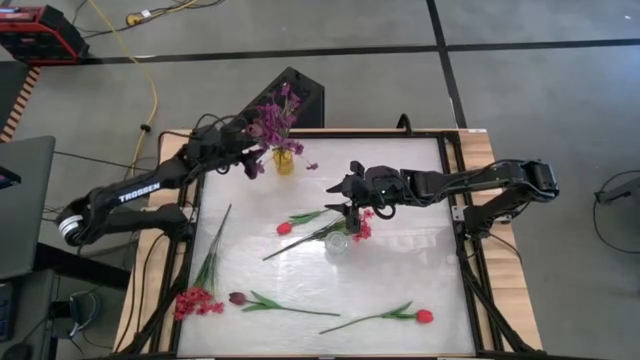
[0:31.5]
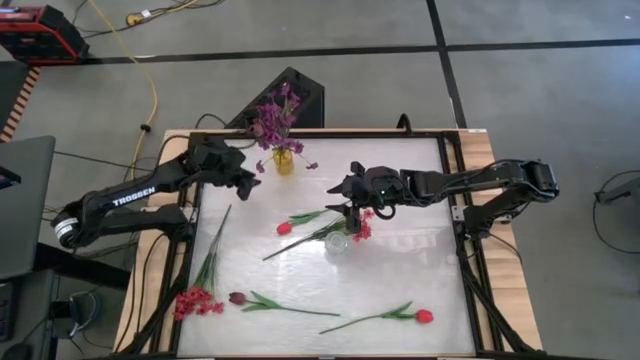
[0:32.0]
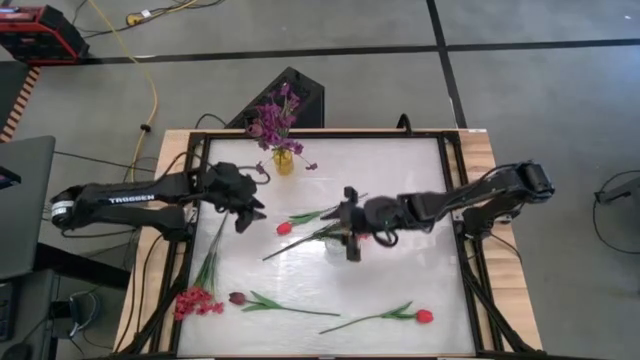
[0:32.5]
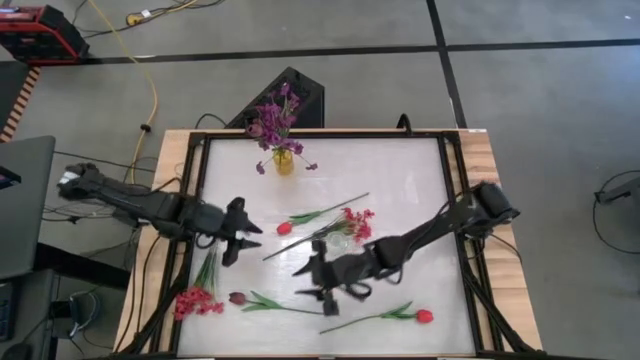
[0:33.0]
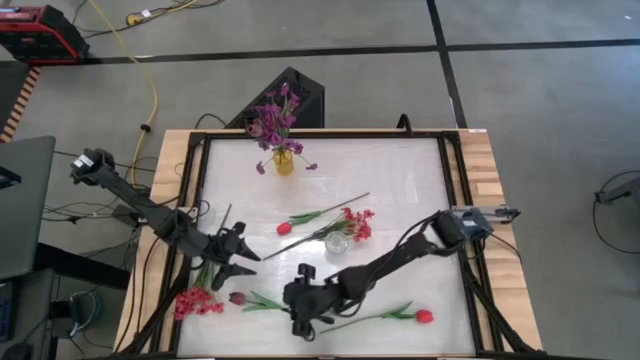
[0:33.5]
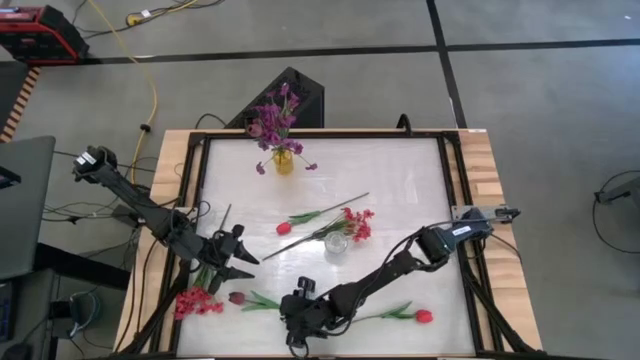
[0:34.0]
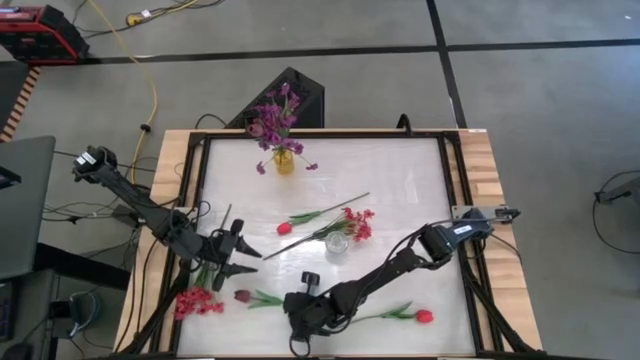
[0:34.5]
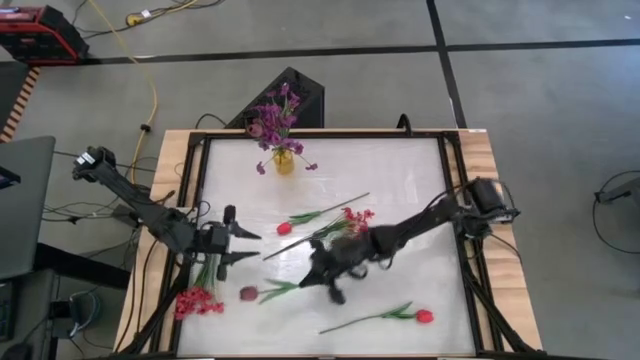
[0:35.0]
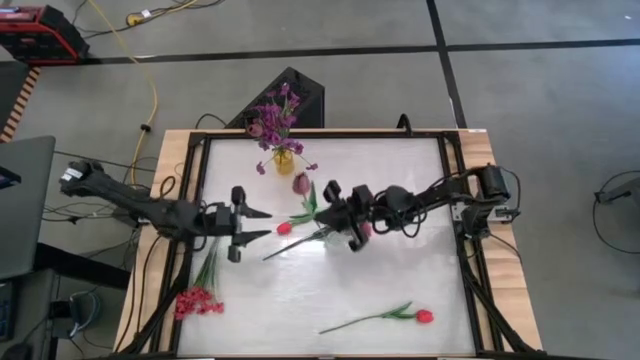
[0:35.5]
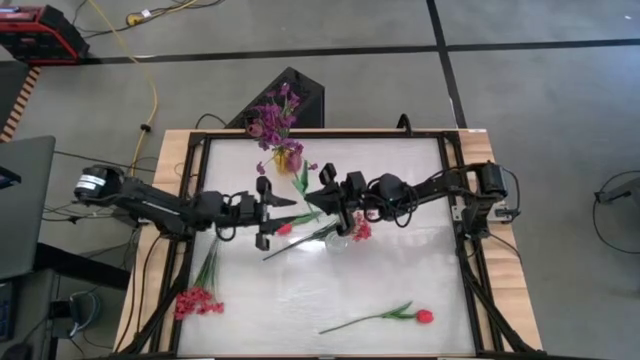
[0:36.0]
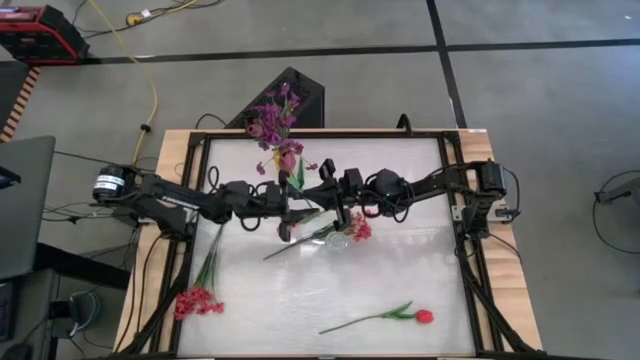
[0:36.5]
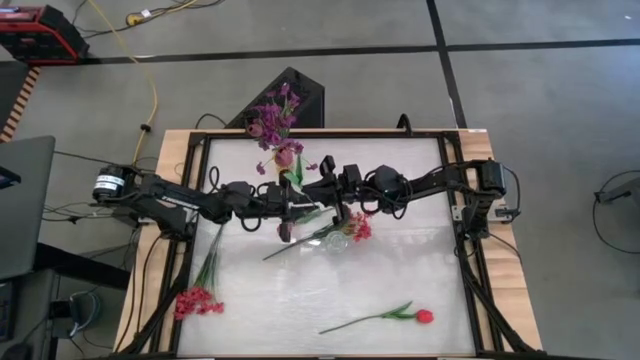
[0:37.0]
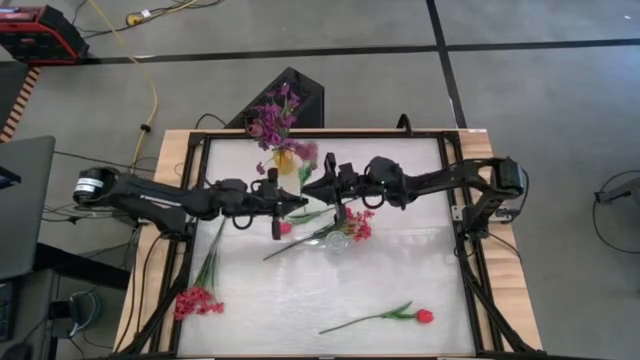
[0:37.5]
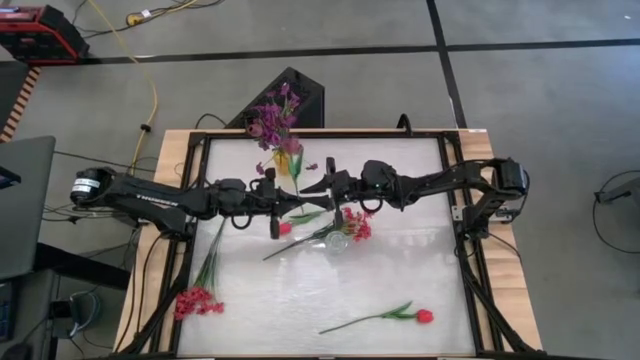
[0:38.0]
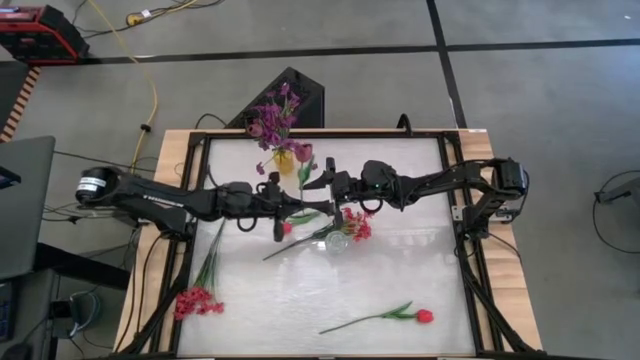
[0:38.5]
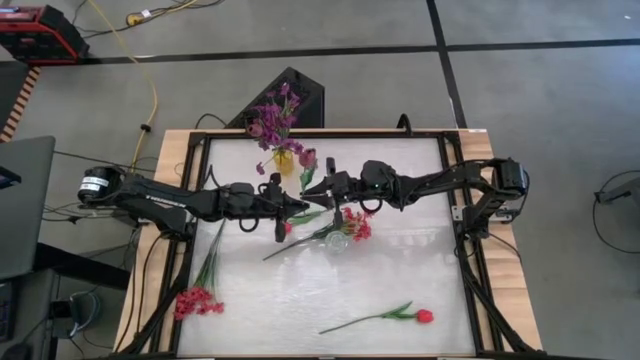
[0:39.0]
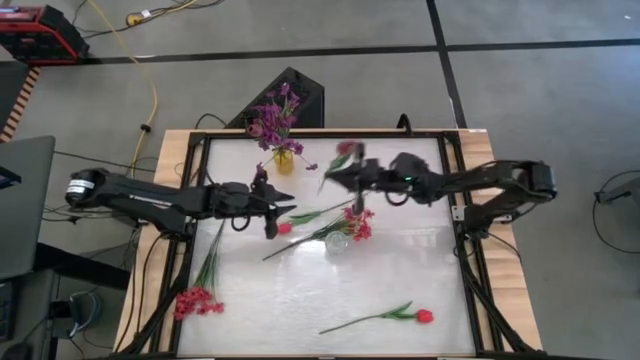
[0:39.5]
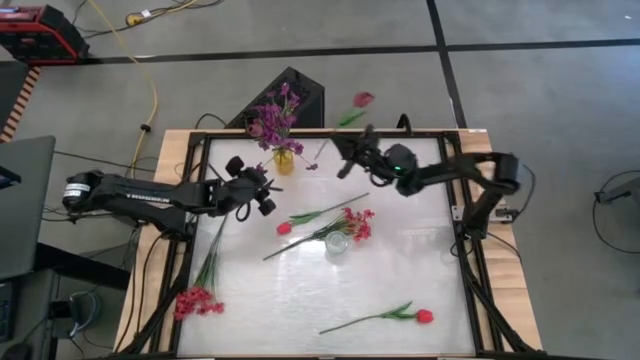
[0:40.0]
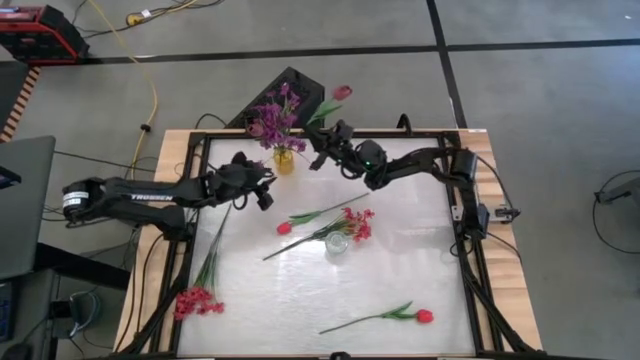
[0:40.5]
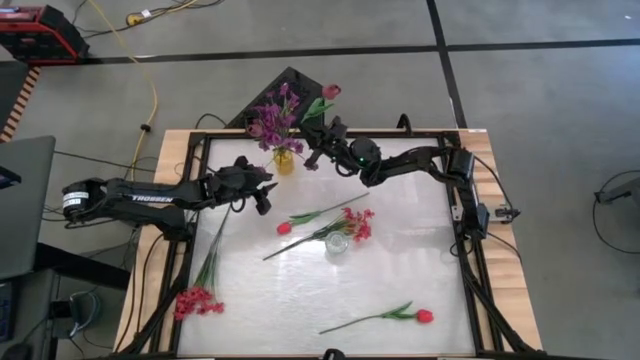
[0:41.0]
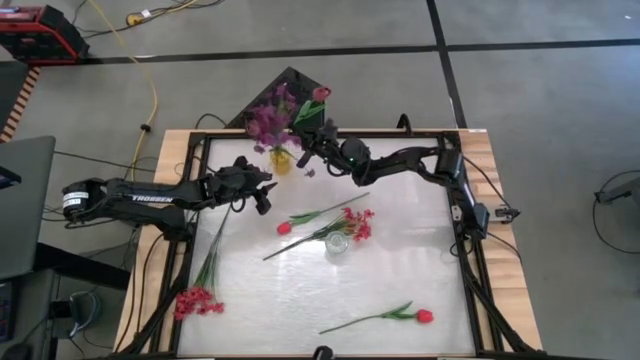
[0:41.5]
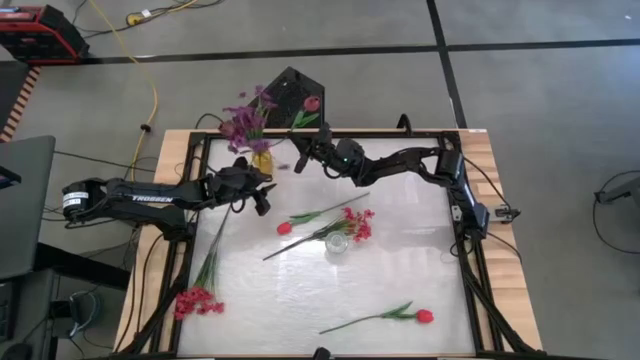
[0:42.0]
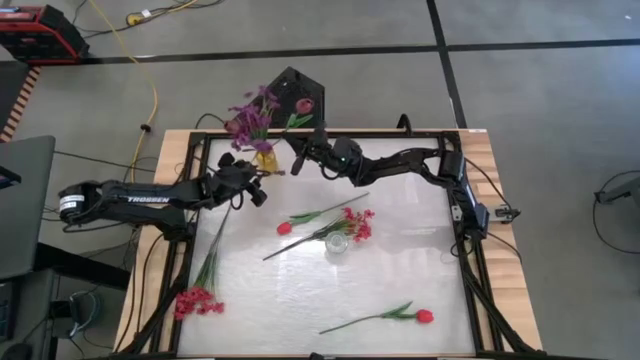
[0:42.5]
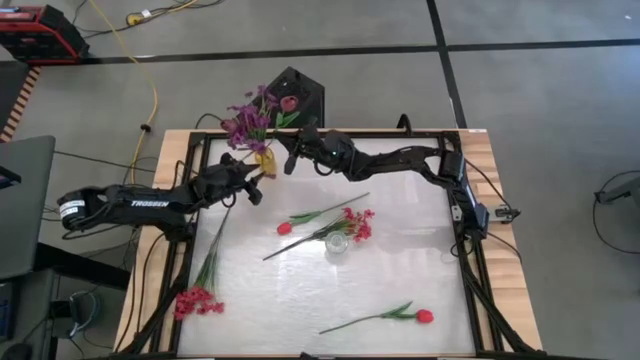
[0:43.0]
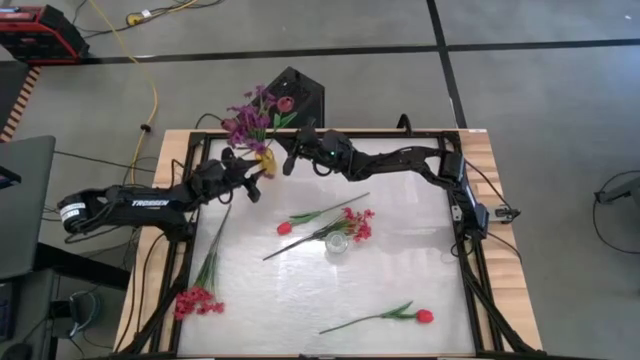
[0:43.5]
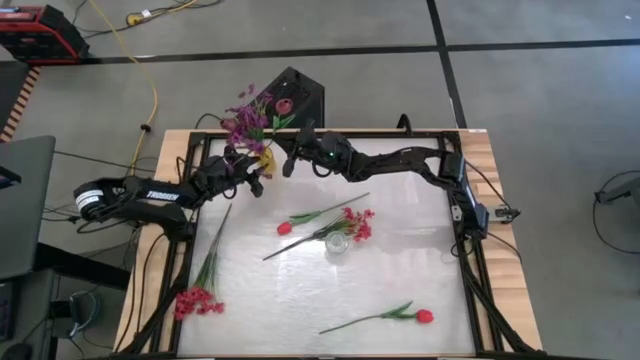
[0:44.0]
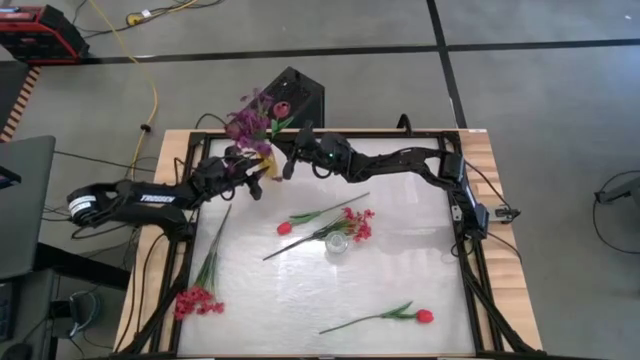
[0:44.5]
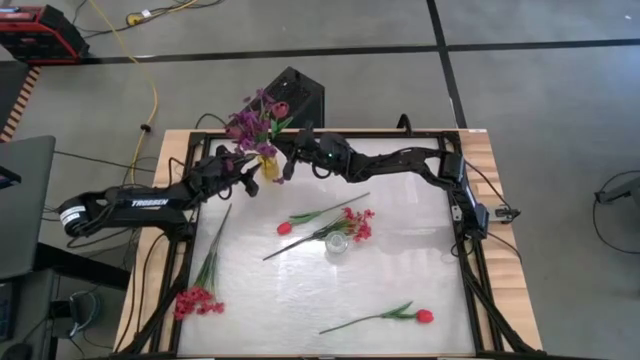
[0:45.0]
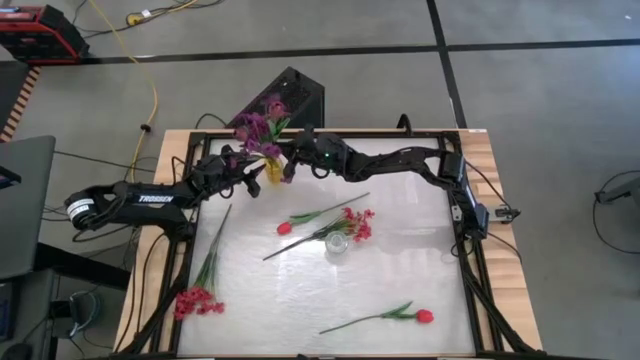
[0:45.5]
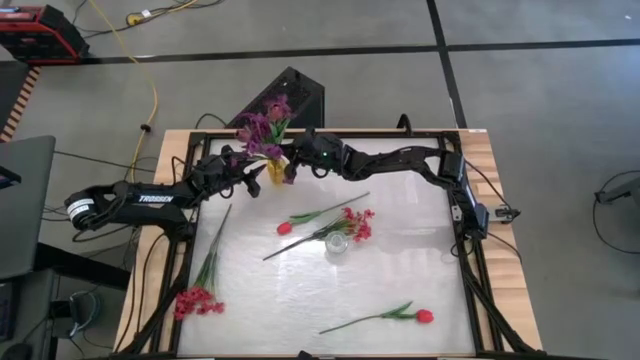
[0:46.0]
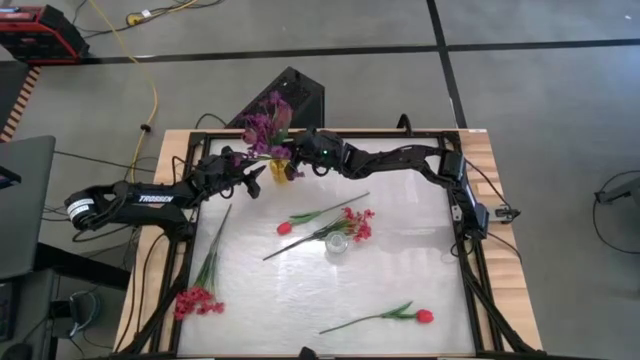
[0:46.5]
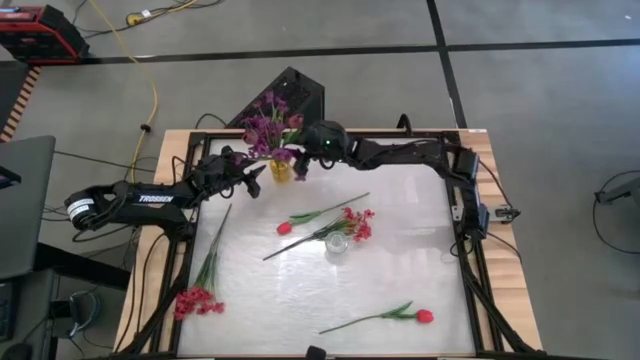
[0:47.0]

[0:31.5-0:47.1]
Task: Sort flowers into vase by color
Put the purple flower into the yellow vase

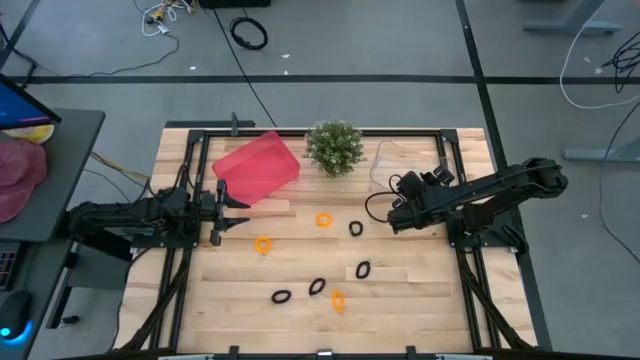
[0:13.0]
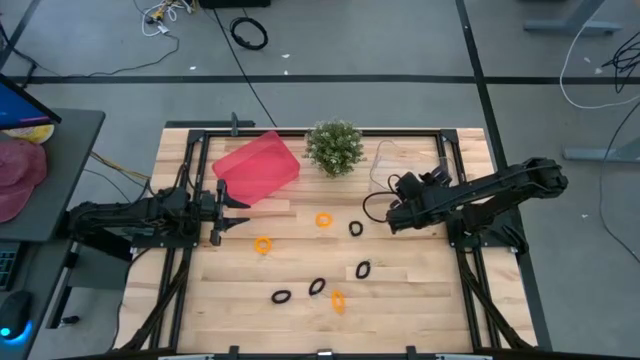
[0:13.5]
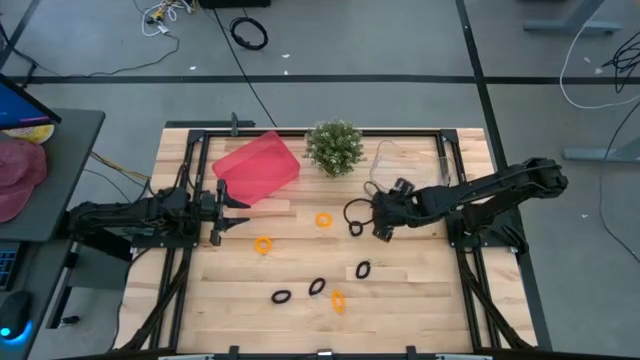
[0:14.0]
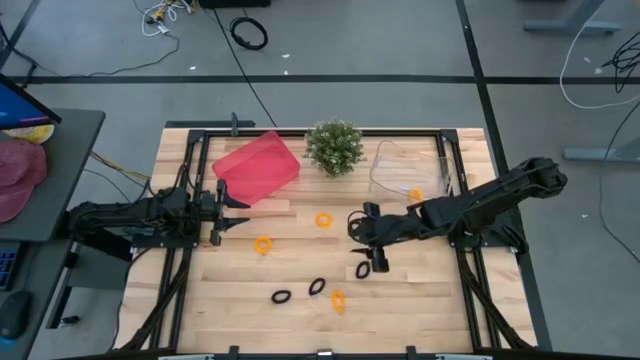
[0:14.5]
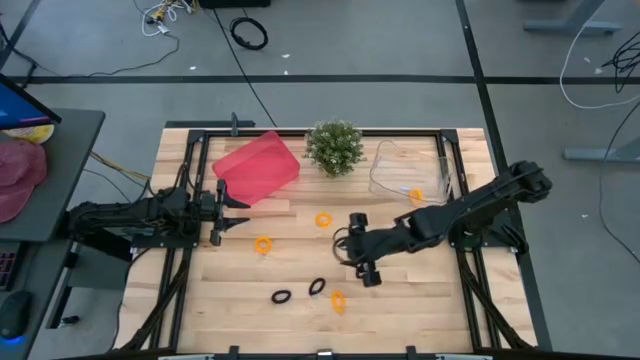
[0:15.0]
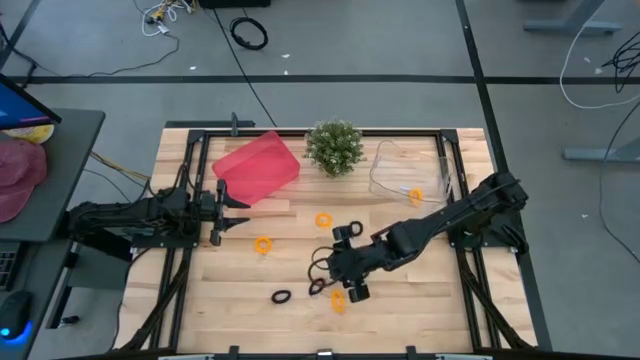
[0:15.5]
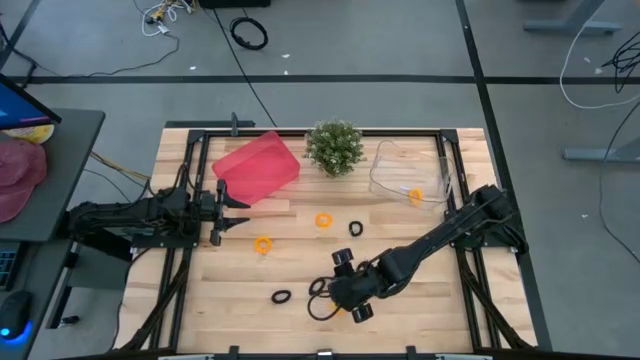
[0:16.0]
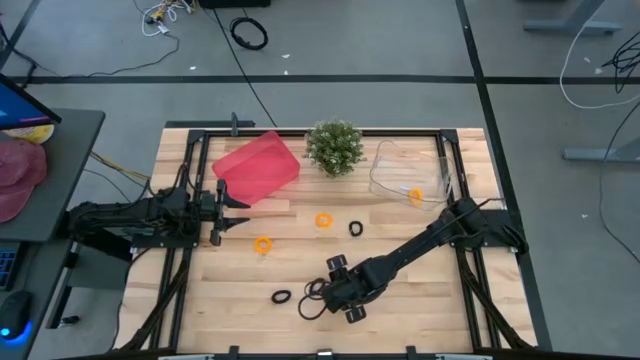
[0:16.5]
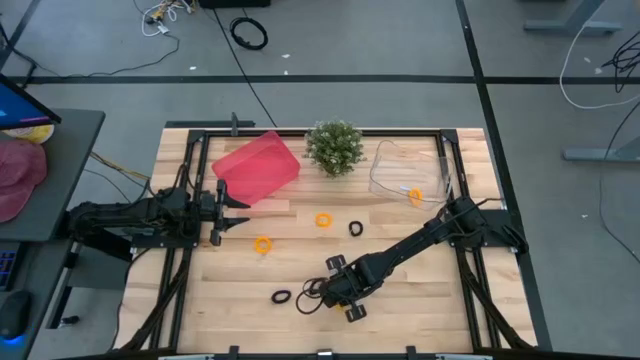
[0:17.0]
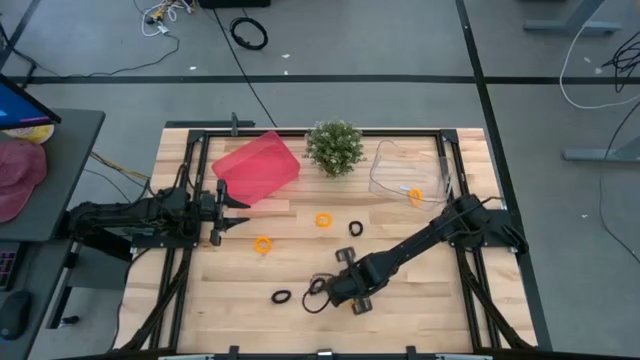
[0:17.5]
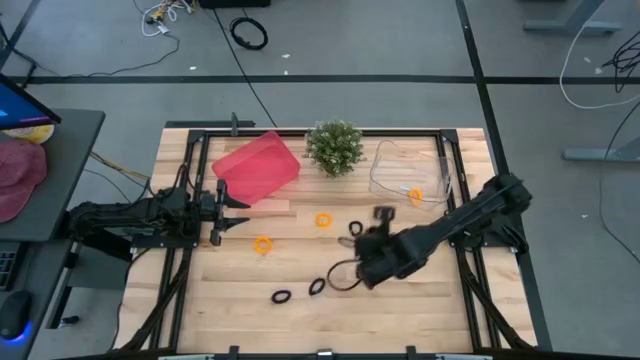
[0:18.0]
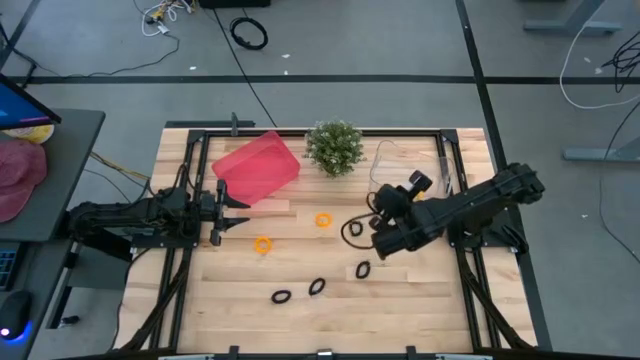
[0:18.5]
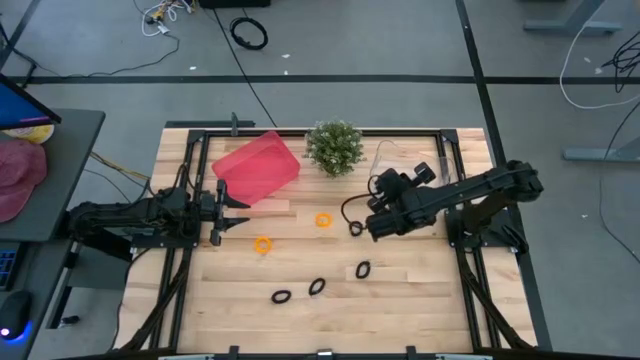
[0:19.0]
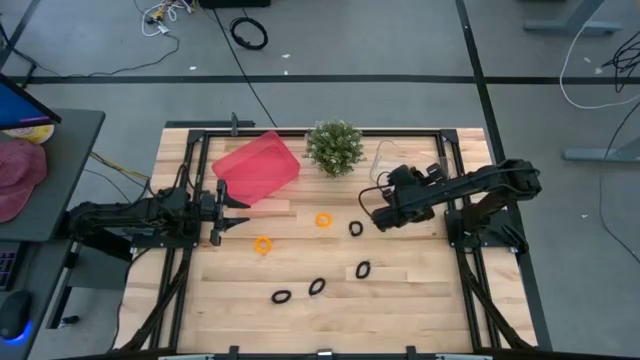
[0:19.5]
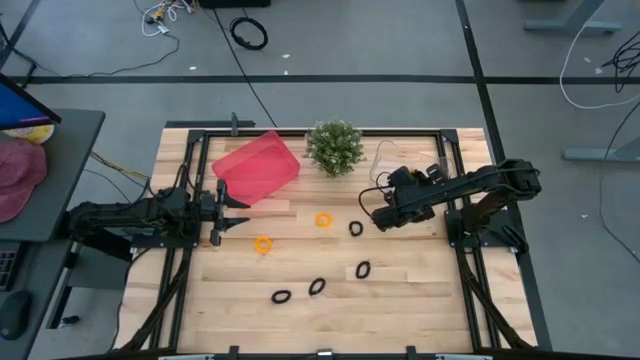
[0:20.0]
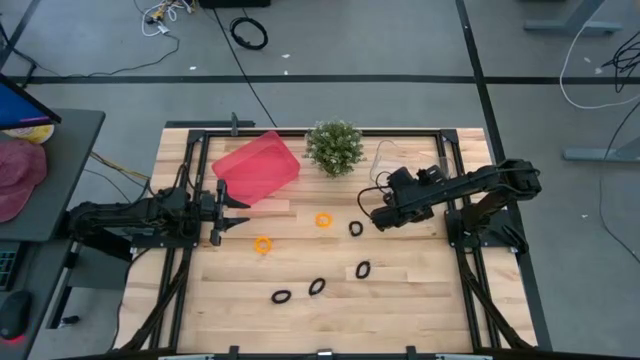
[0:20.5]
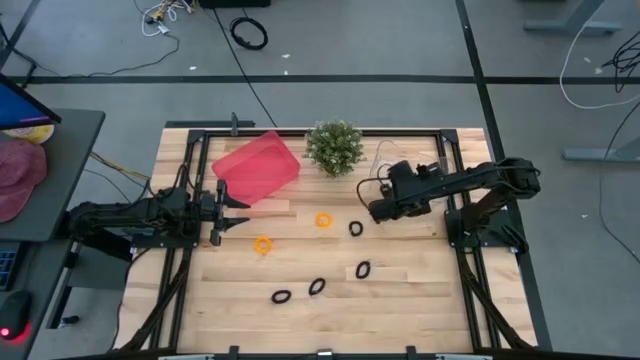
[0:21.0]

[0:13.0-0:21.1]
Task: Sort spring keychains
Put the bottom orange spring keychain into the transparent bin
